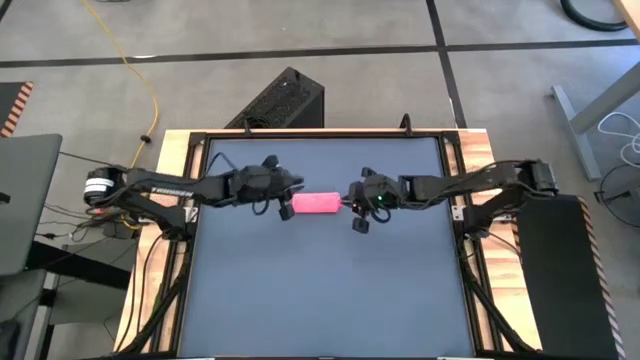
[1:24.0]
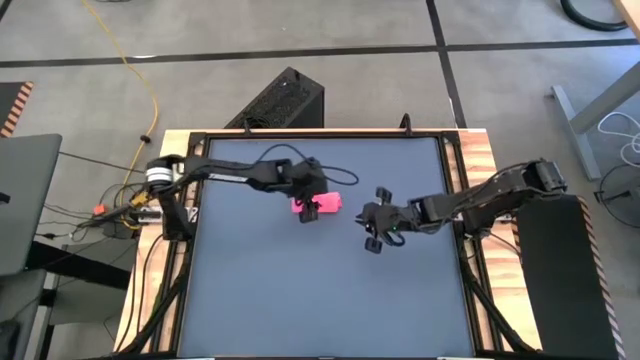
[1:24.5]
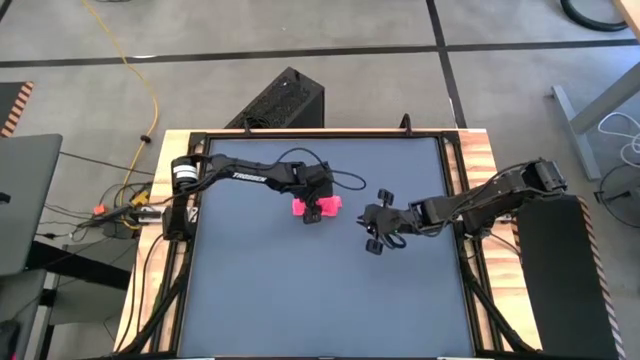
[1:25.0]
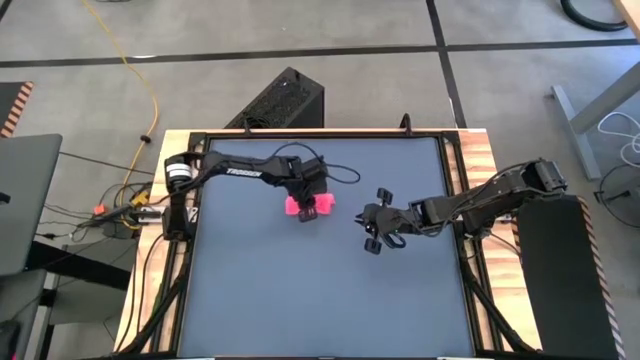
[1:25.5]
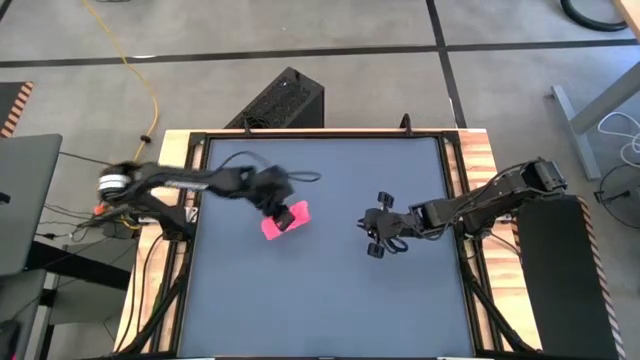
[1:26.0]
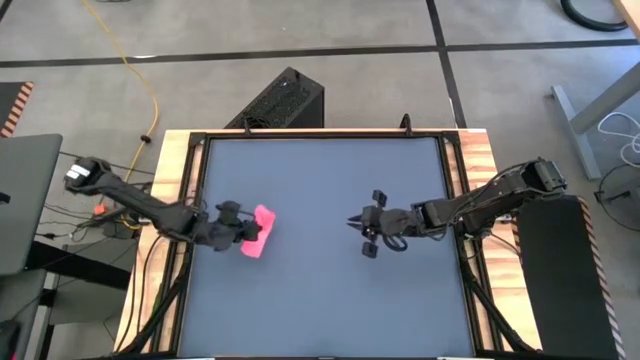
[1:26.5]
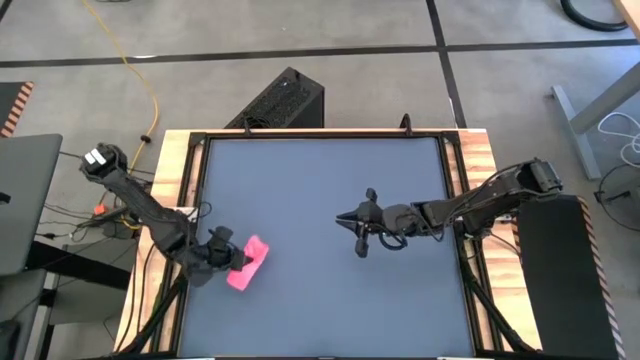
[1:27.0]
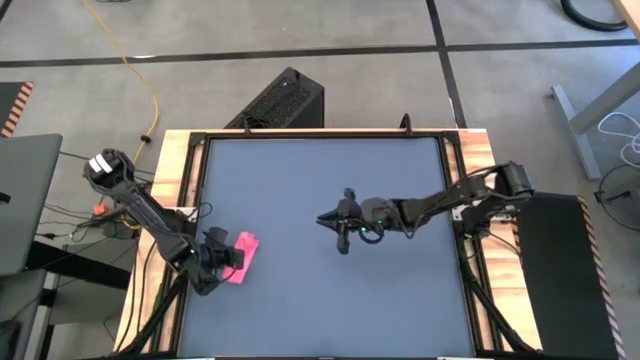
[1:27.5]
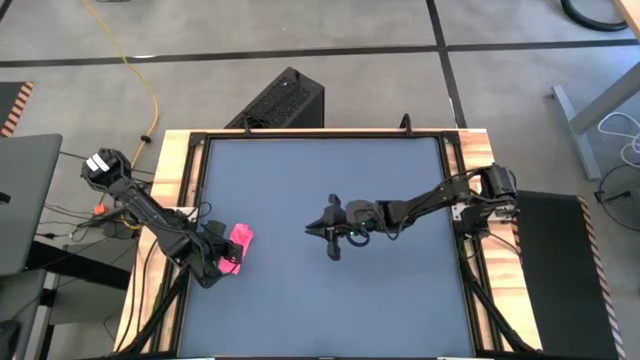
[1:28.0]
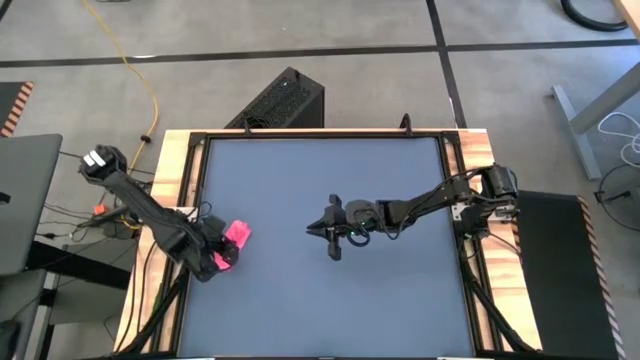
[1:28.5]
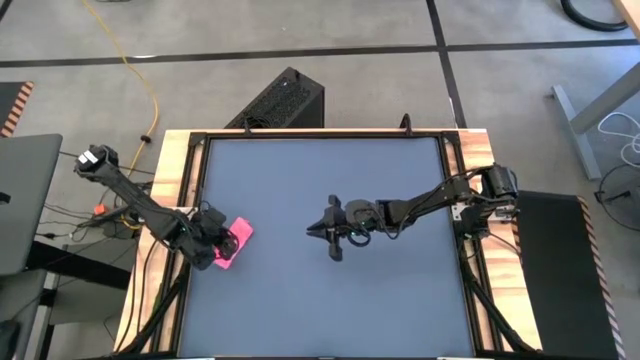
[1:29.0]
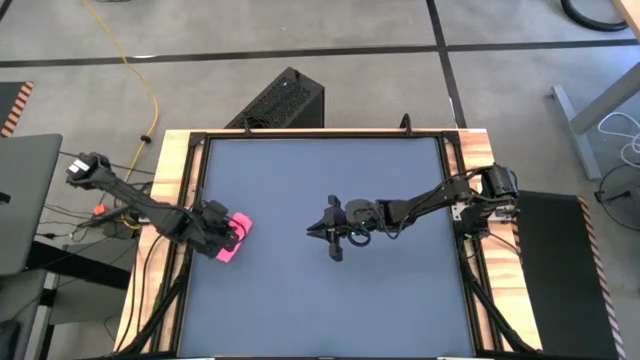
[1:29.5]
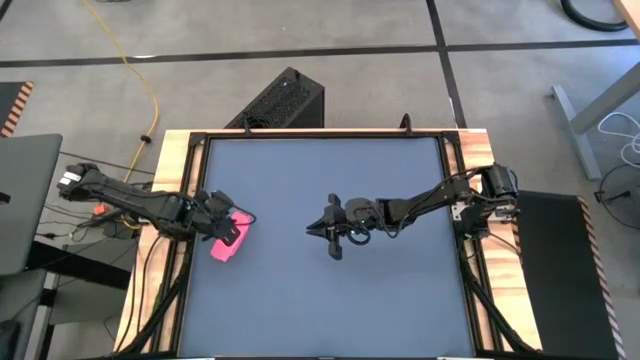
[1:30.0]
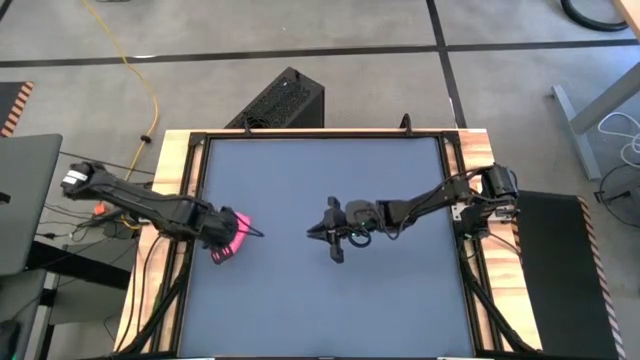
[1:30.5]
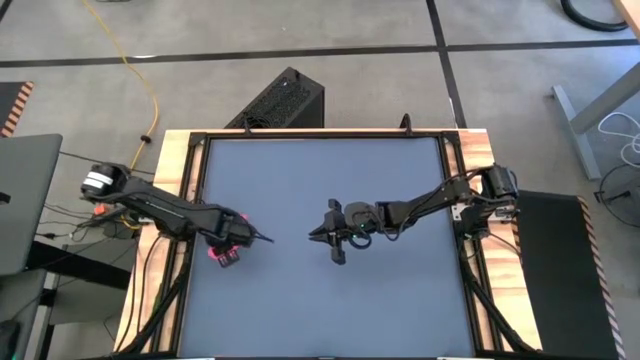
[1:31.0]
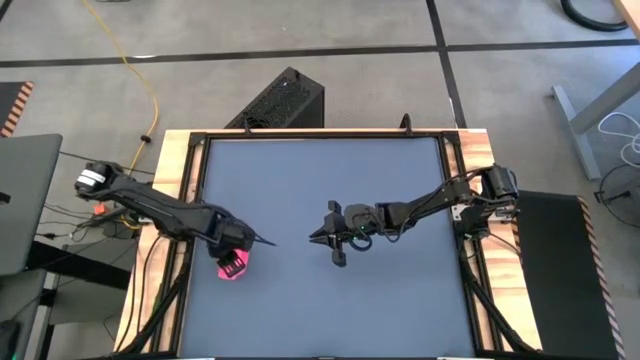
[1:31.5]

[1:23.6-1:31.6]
Task: Roll towel
Move the light red towel to the middle left of the table

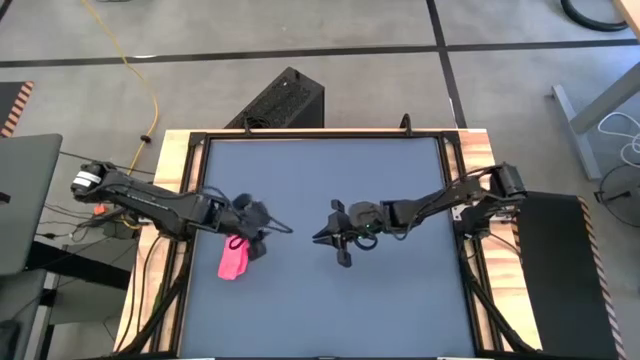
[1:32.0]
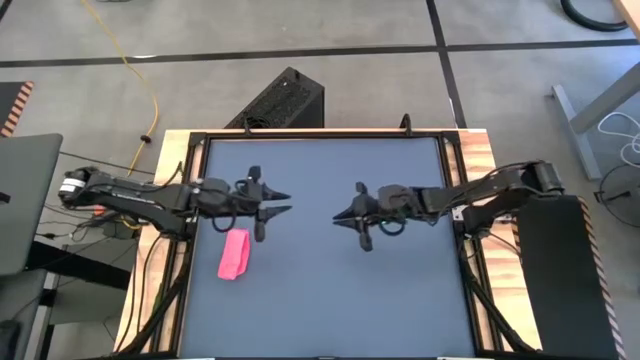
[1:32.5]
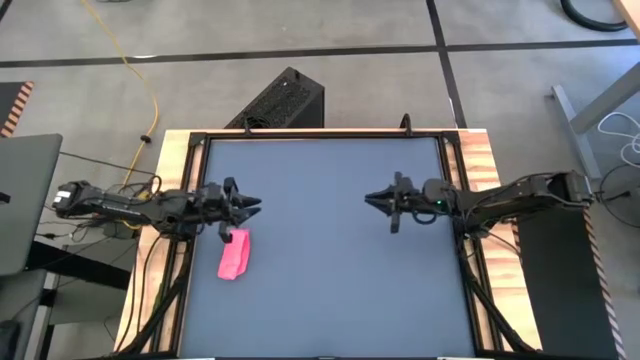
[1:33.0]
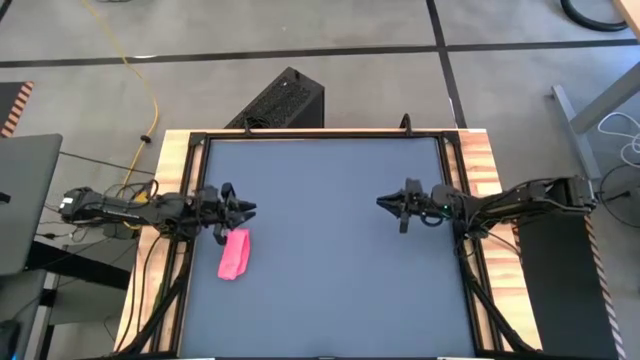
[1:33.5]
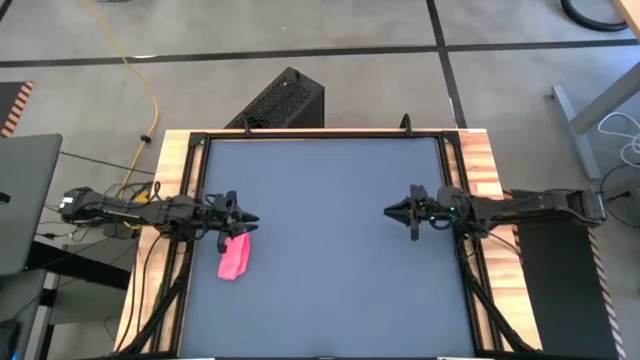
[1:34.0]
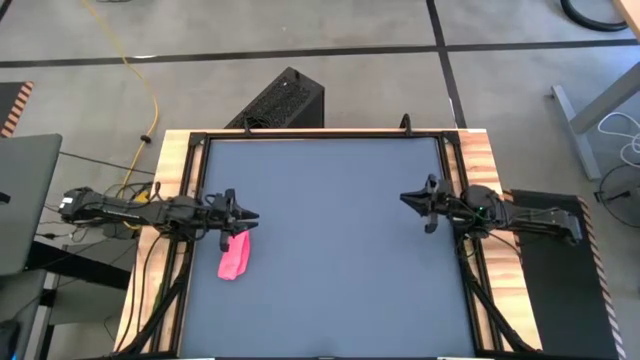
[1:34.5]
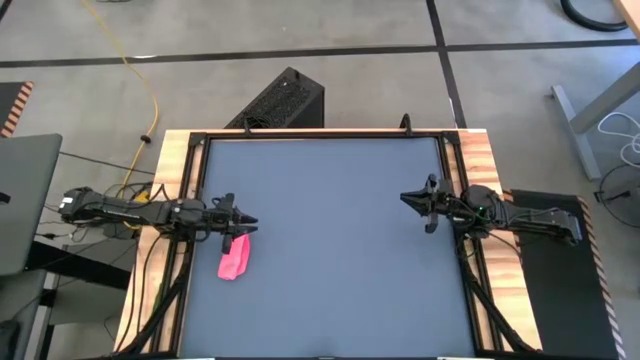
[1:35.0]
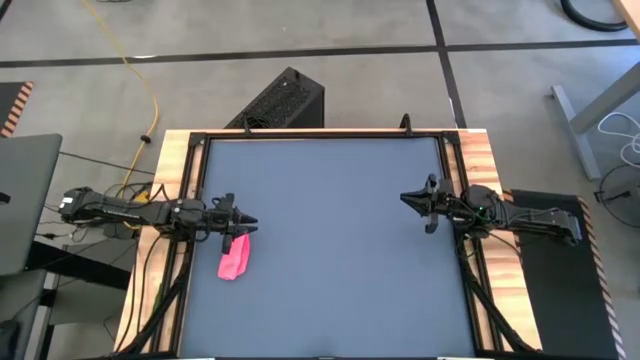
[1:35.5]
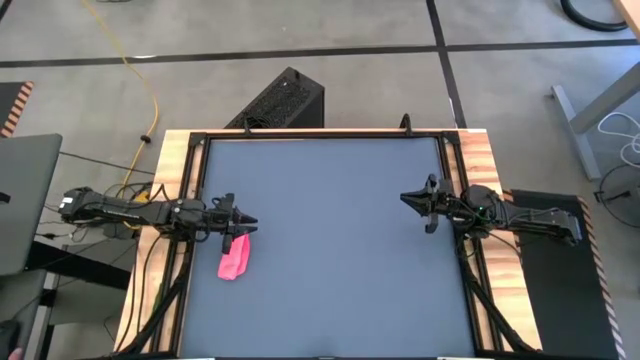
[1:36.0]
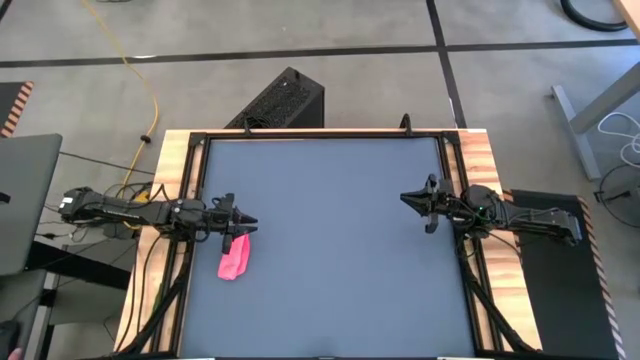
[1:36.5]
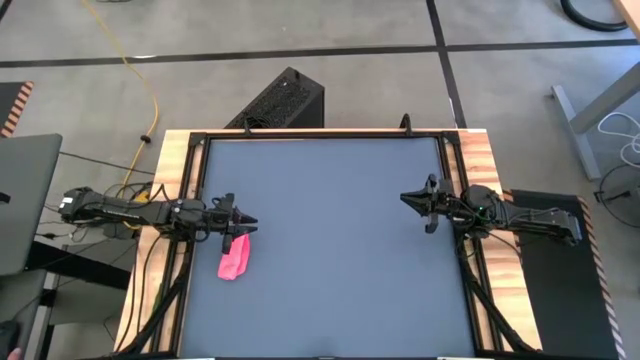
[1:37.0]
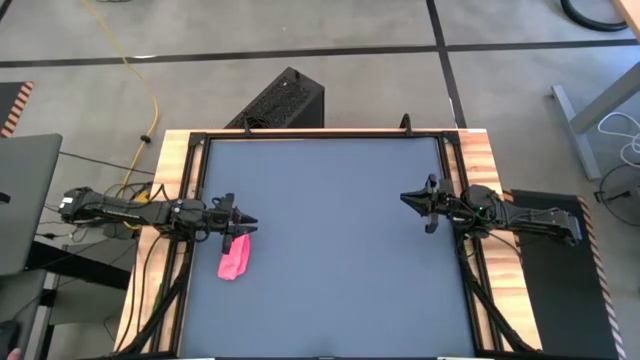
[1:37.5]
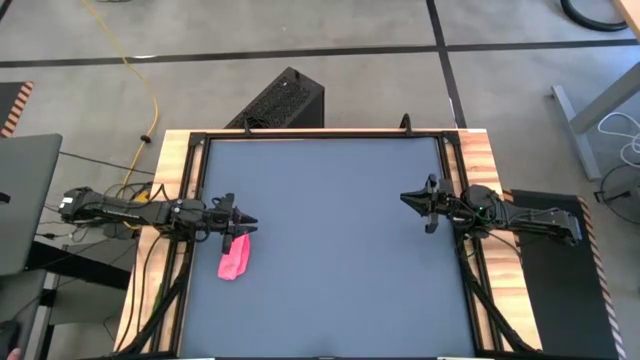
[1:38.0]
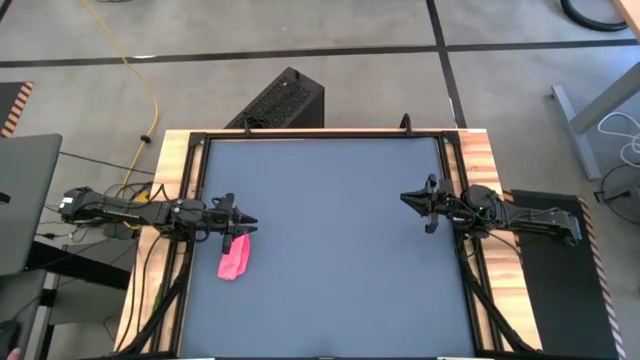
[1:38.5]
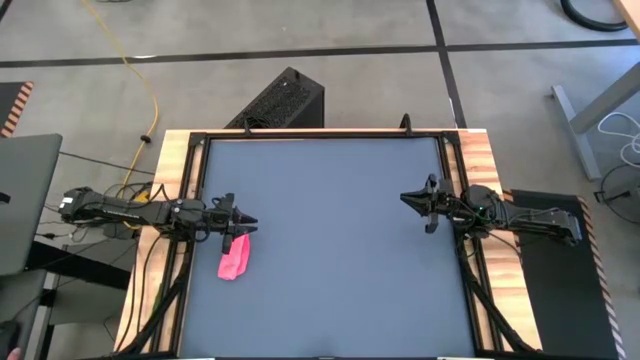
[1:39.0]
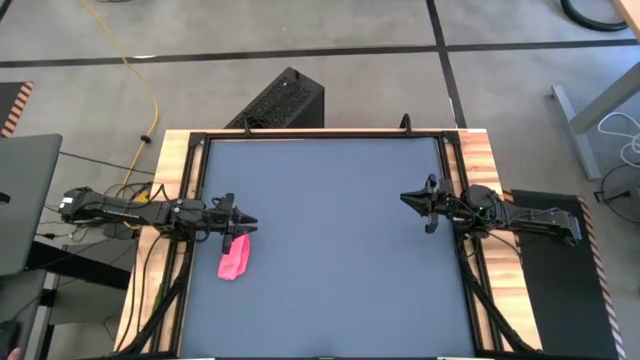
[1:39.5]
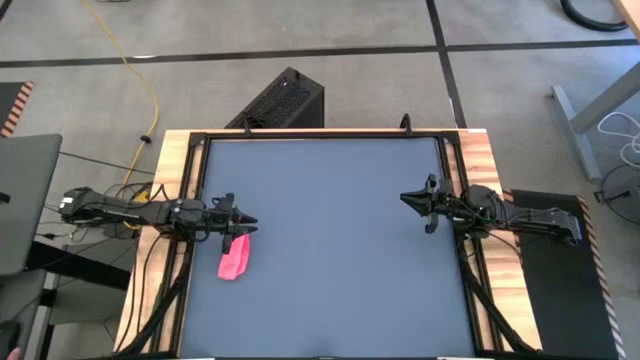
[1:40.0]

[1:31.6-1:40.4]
Return to Home Position

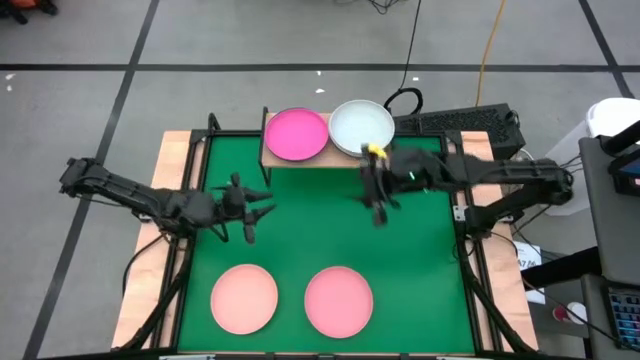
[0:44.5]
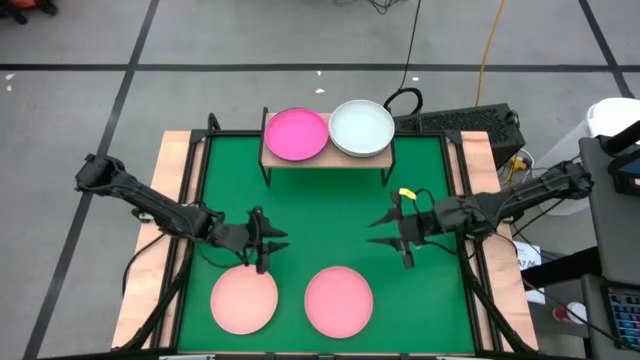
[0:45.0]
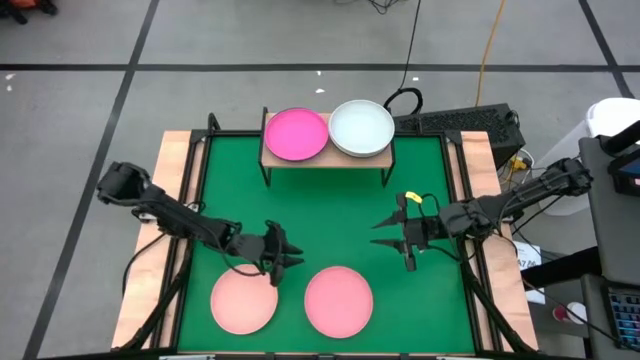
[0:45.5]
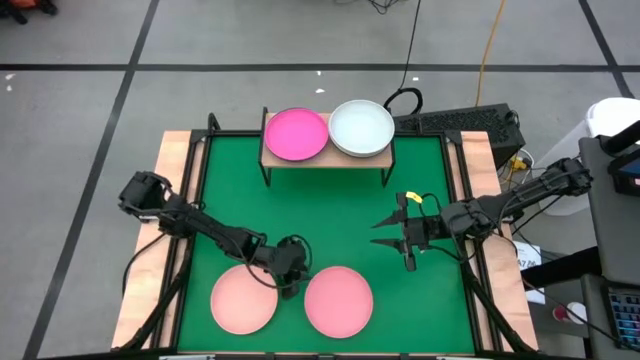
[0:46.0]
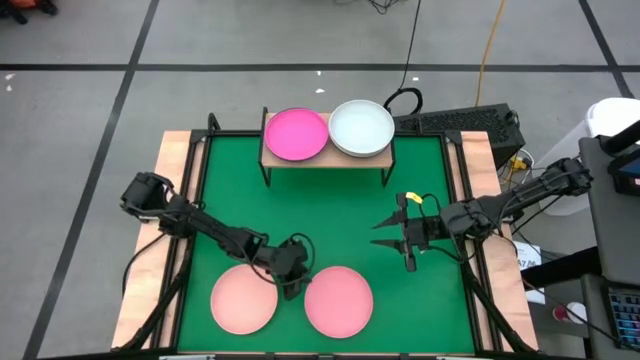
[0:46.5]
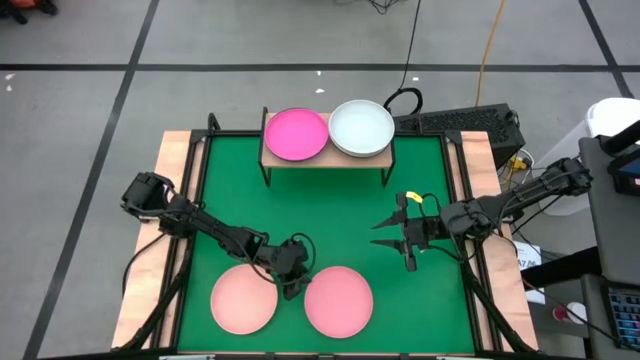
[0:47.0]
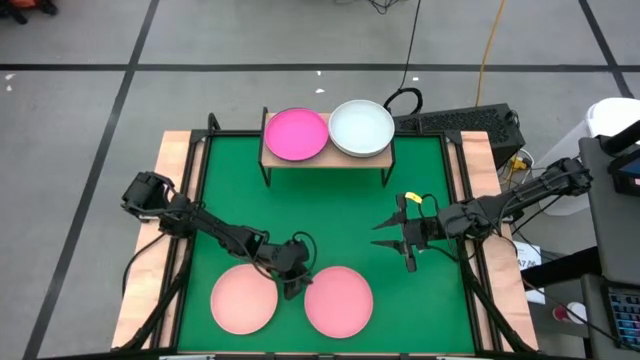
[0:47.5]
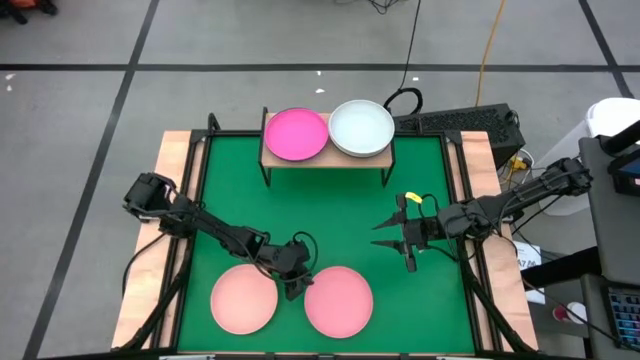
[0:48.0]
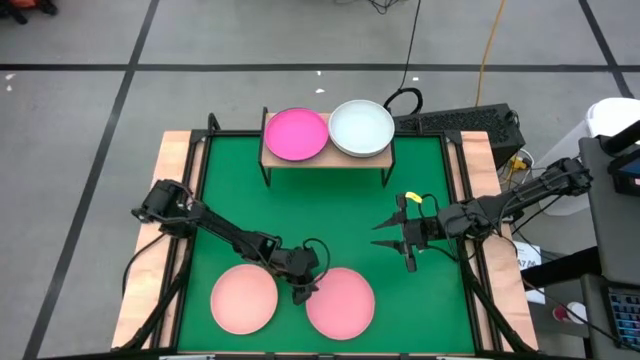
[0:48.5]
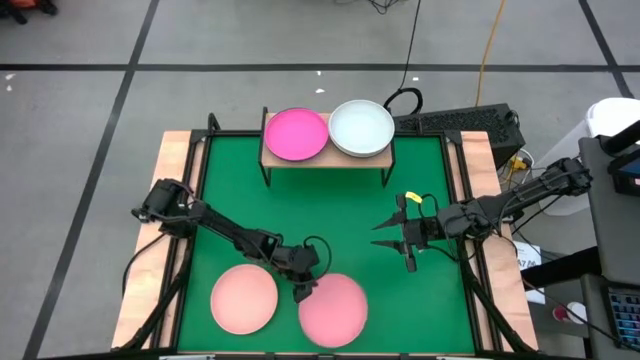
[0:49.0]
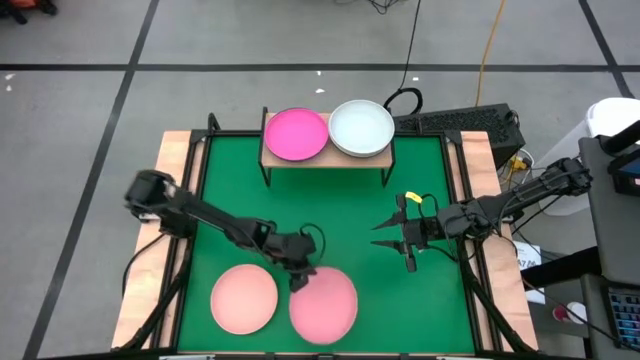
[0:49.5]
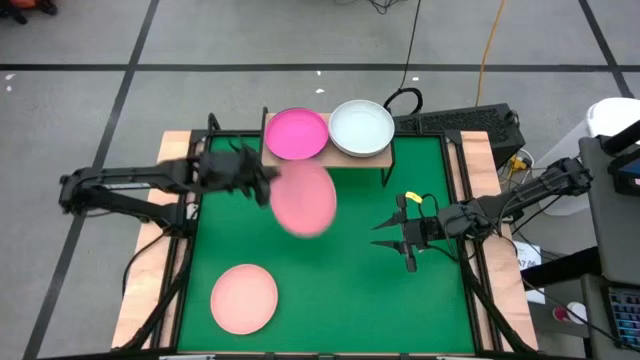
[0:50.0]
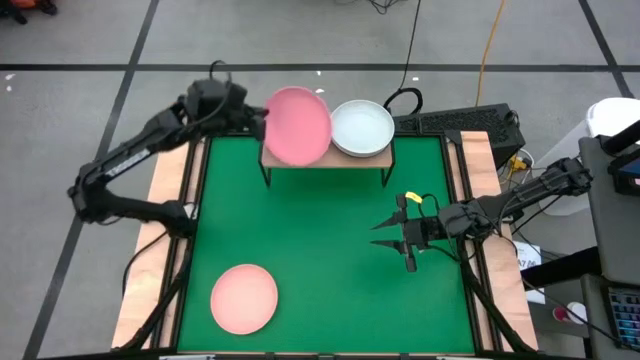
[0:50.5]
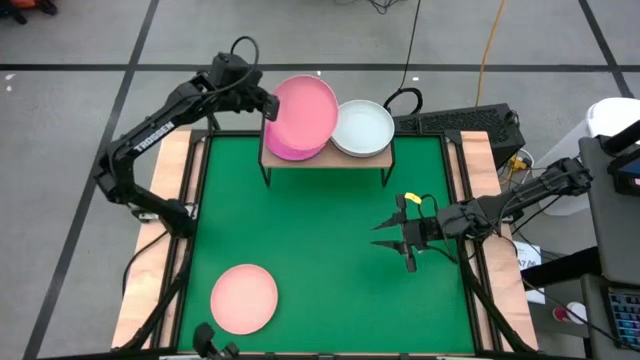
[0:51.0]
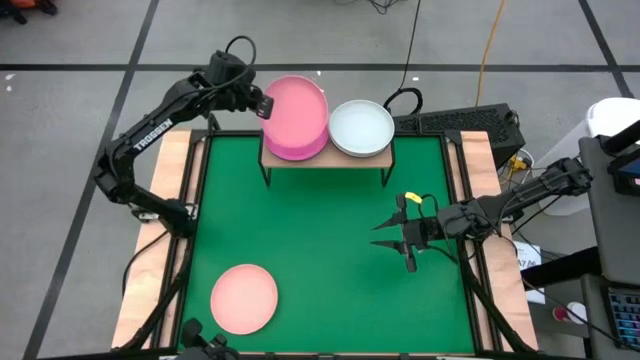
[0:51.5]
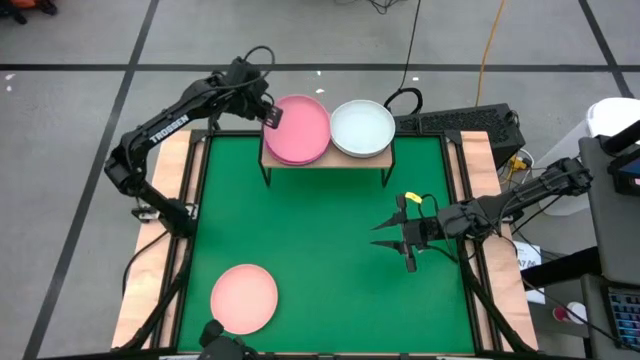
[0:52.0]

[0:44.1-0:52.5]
Task: Place and stack plates onto a shelf
Stack the light pink plate on top the pink plate on the shelf
